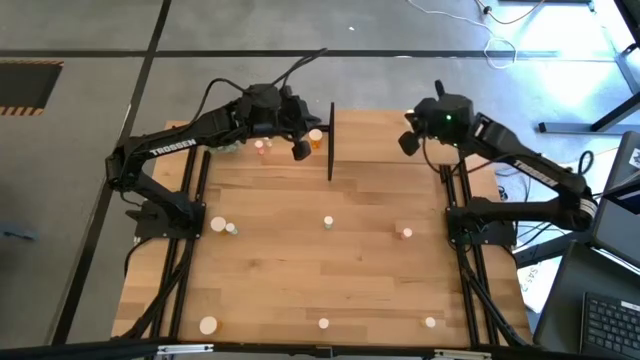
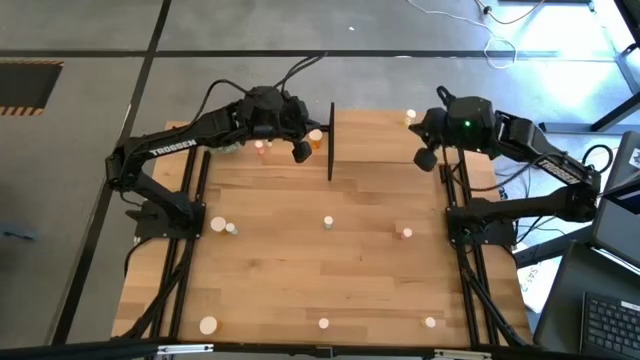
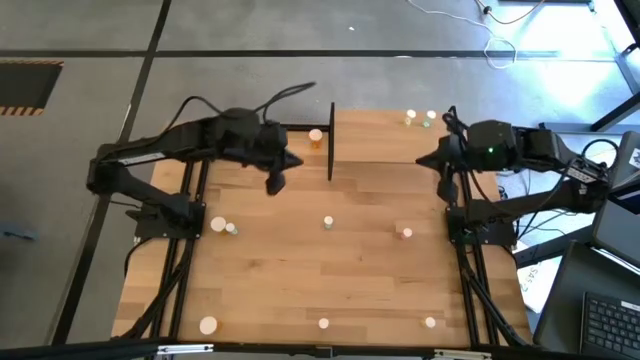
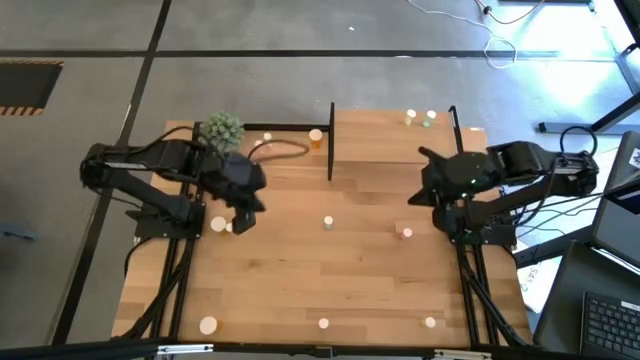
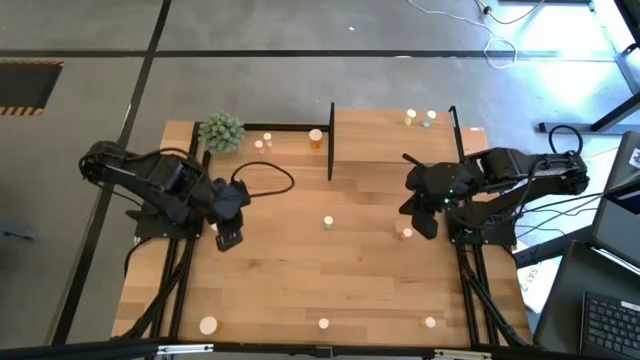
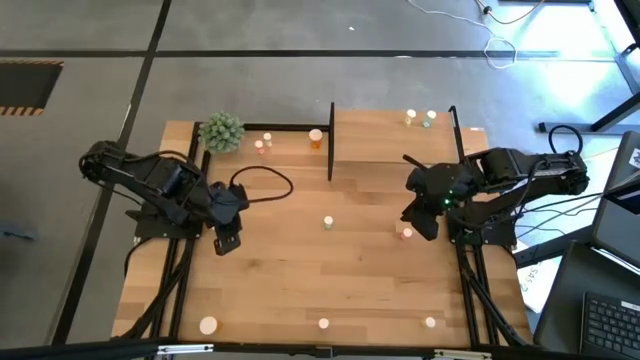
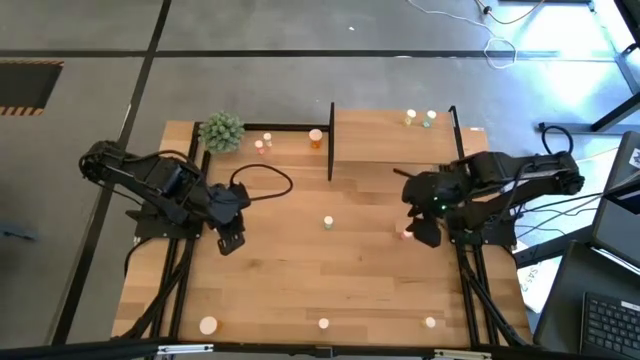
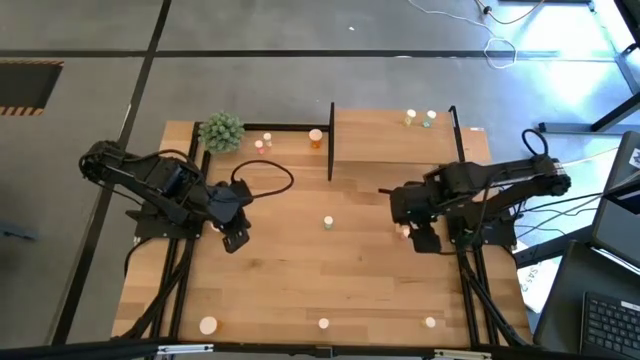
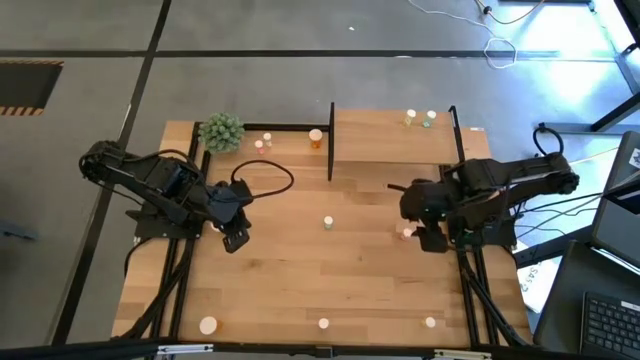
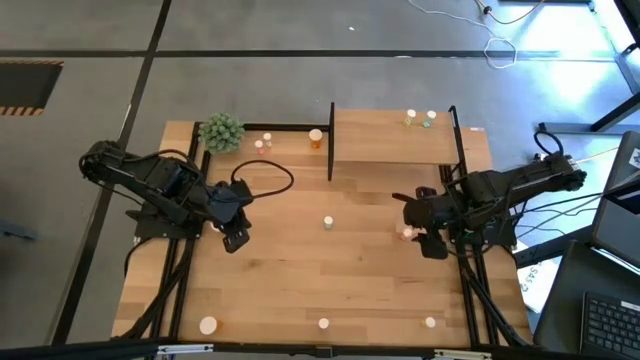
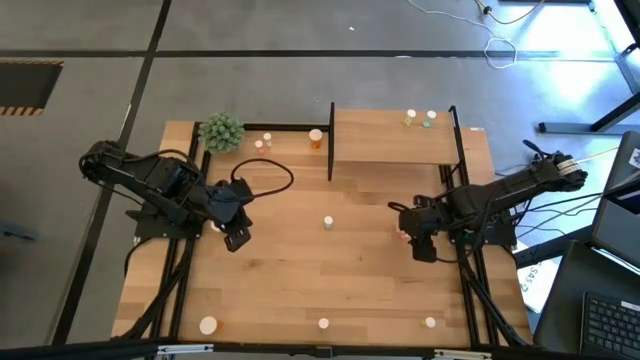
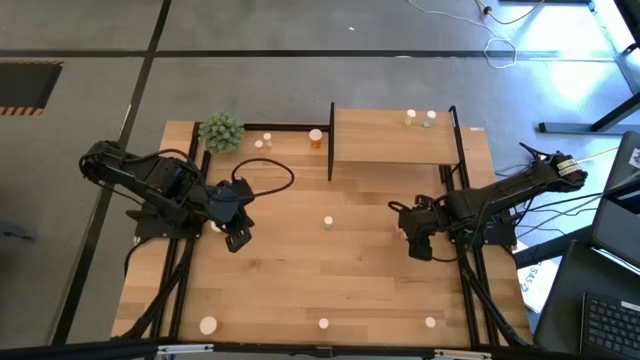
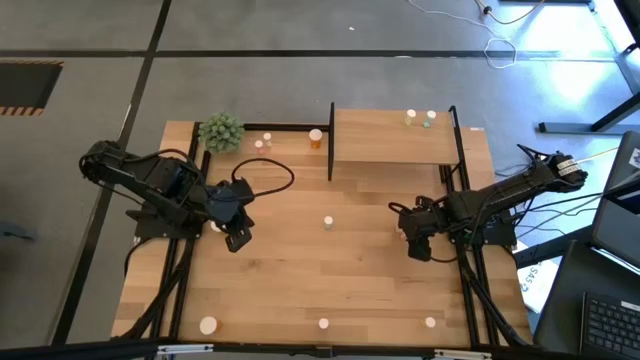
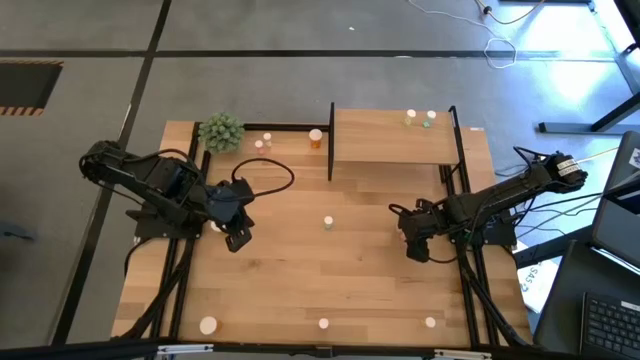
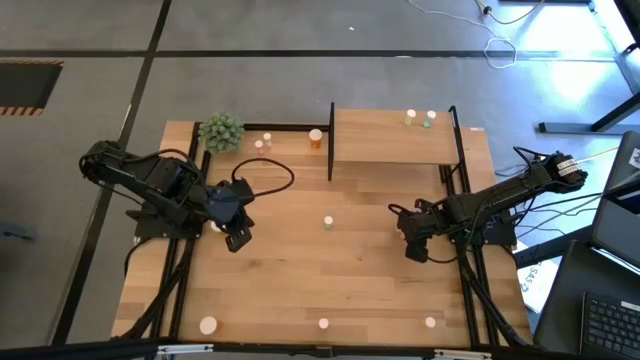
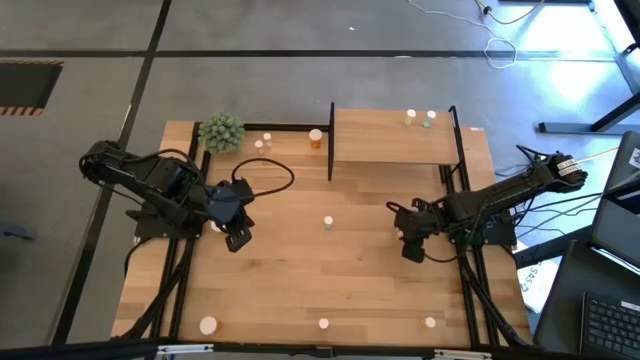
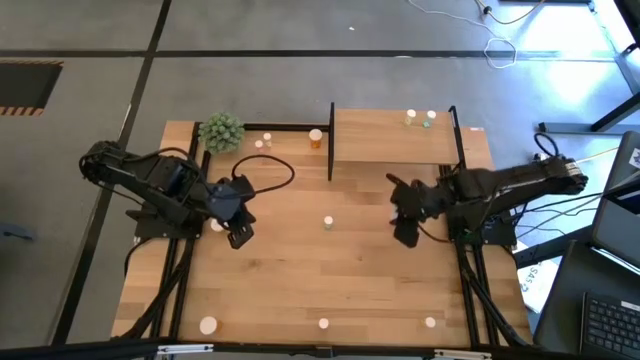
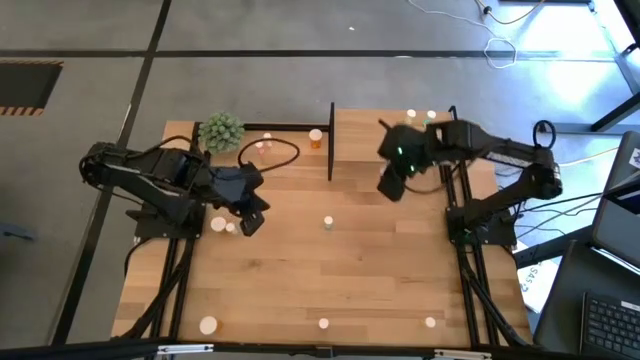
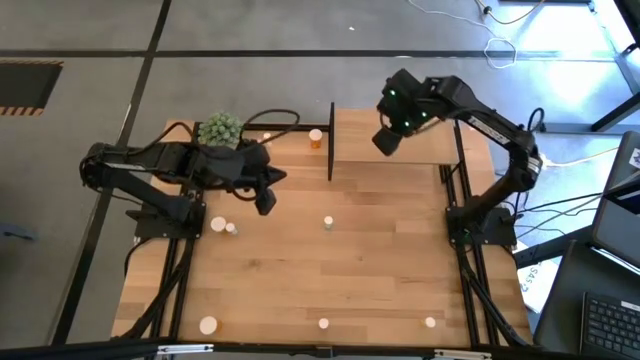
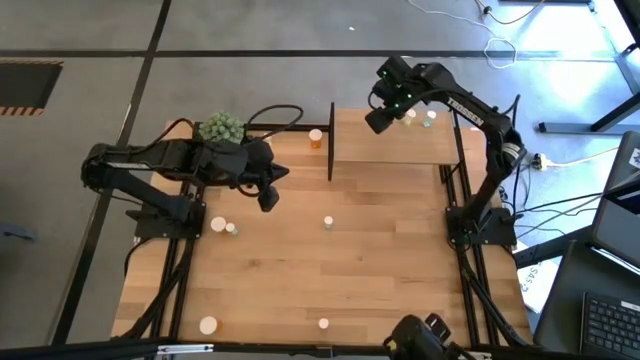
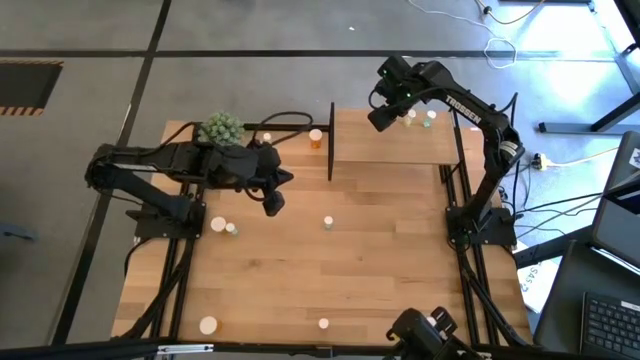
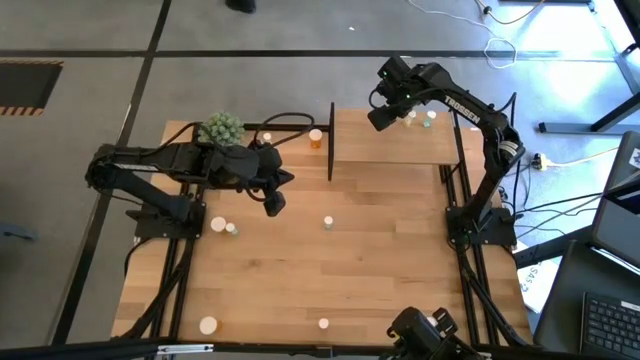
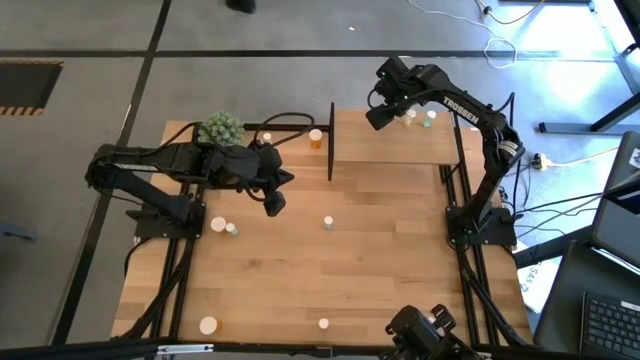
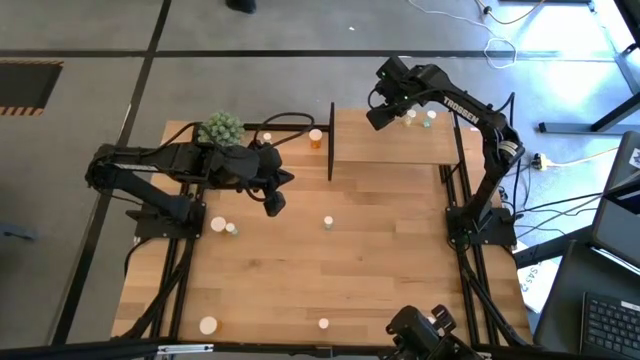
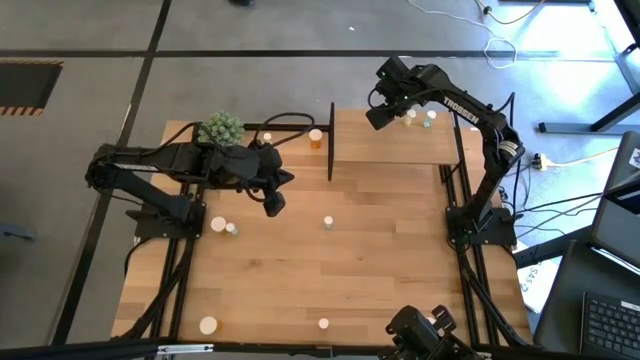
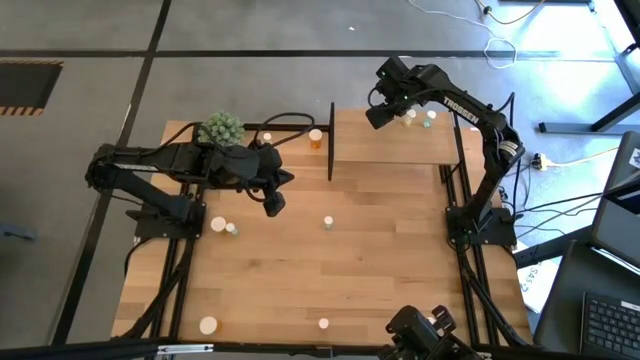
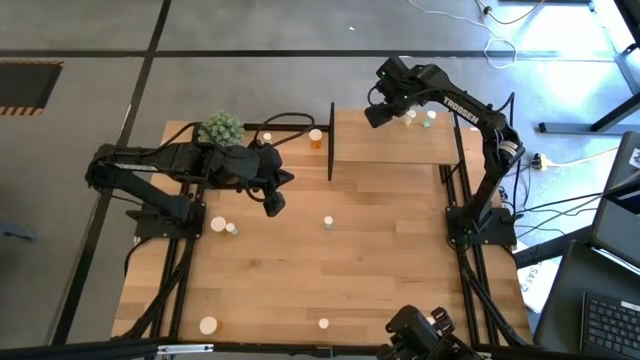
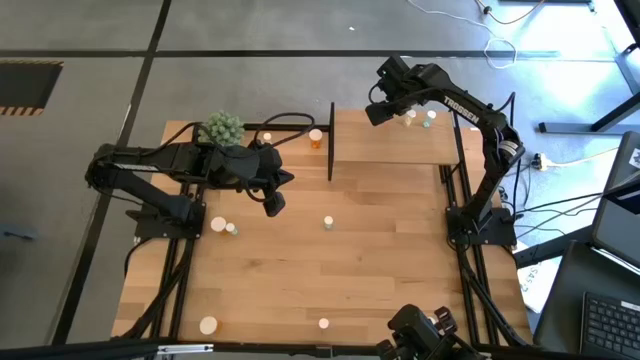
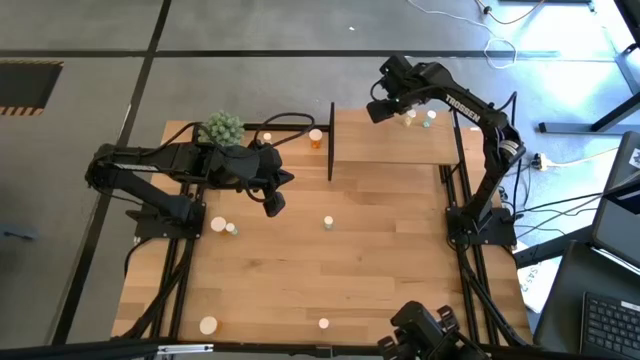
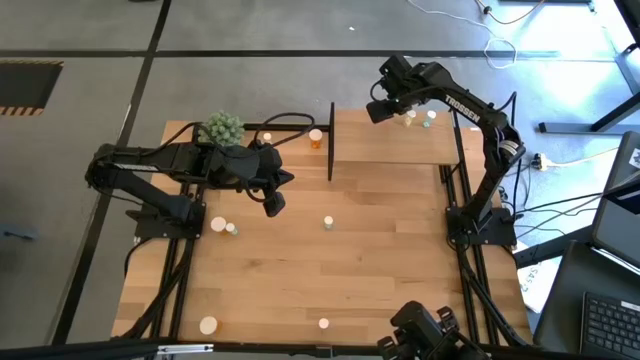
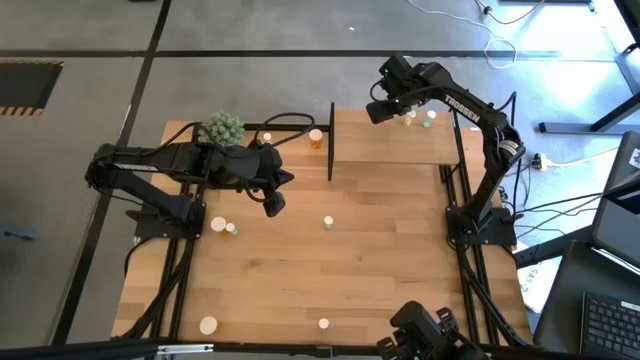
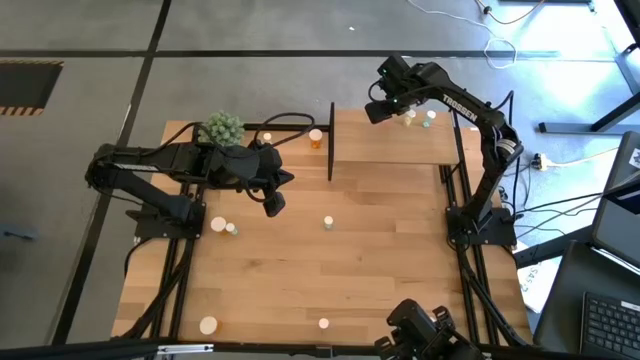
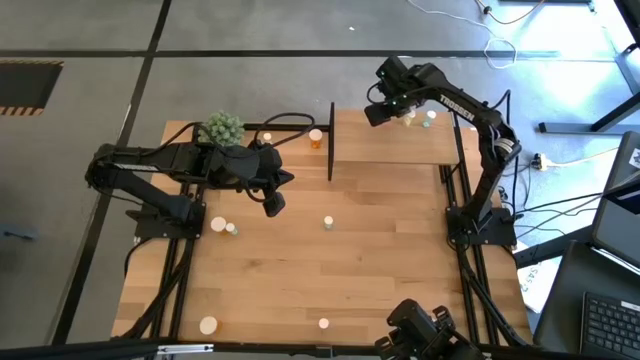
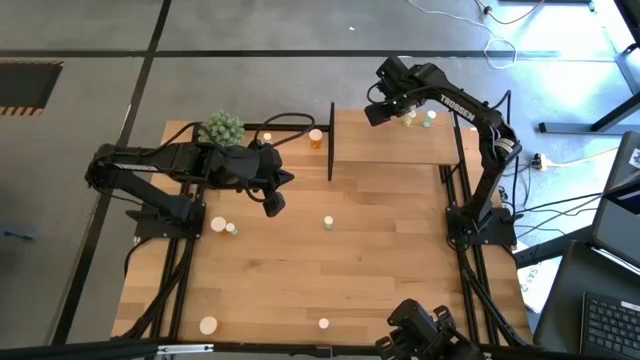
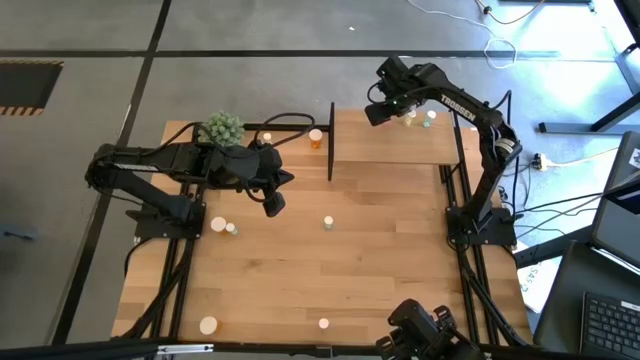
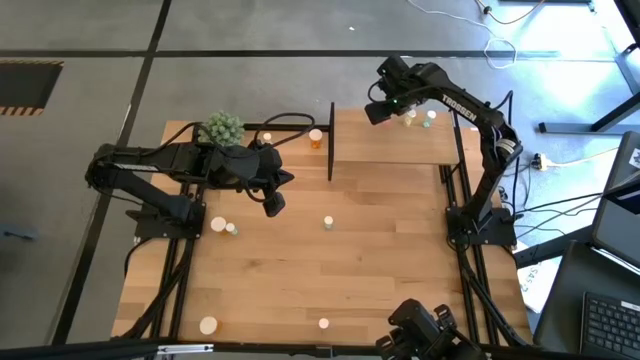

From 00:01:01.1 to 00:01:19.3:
Task: Pick and place medicine bottles onto shelf by color
Put the middle pink pill bottle on the shelf

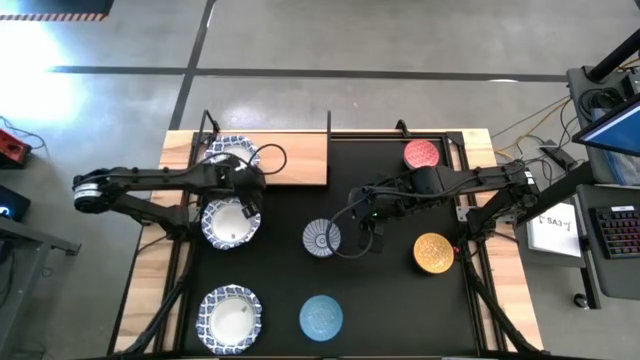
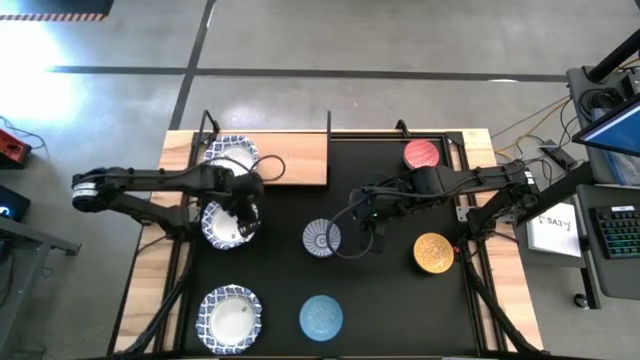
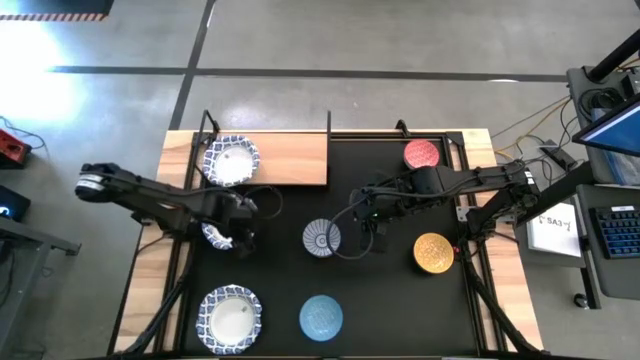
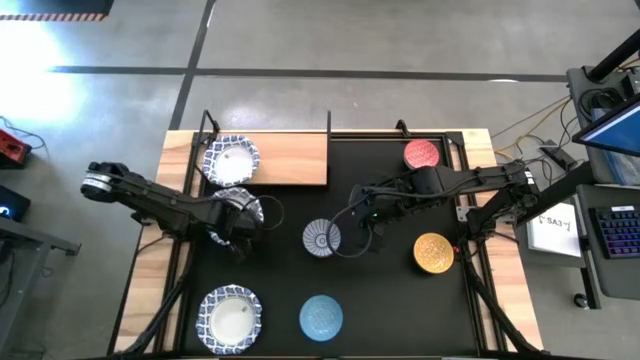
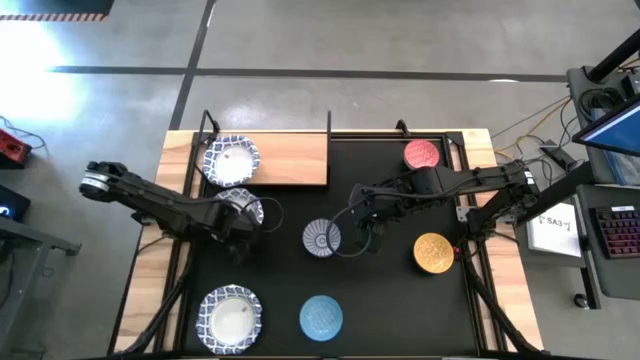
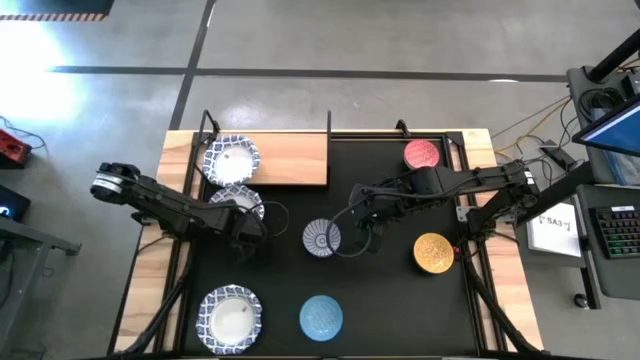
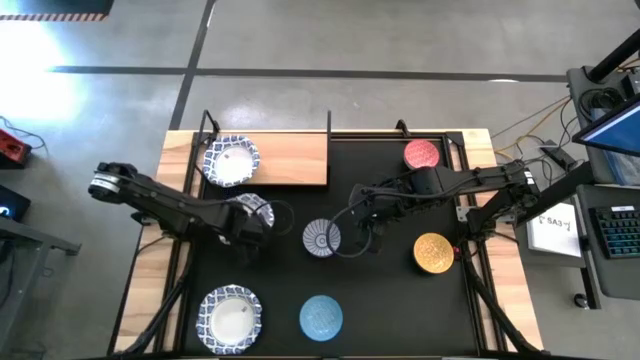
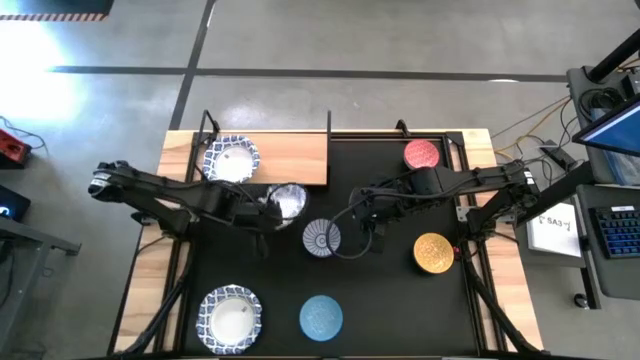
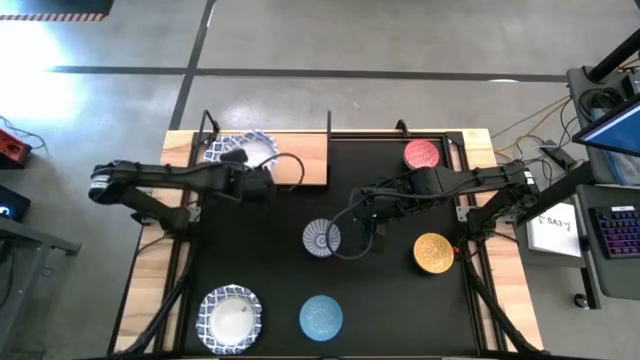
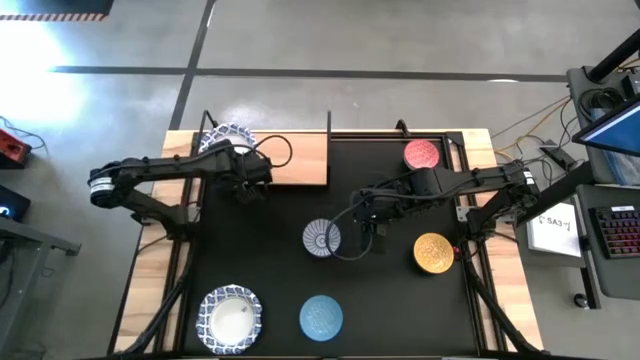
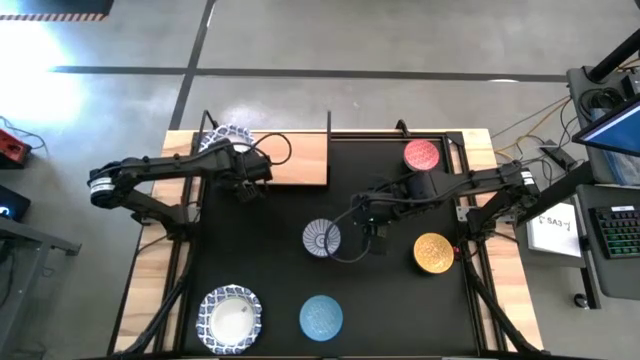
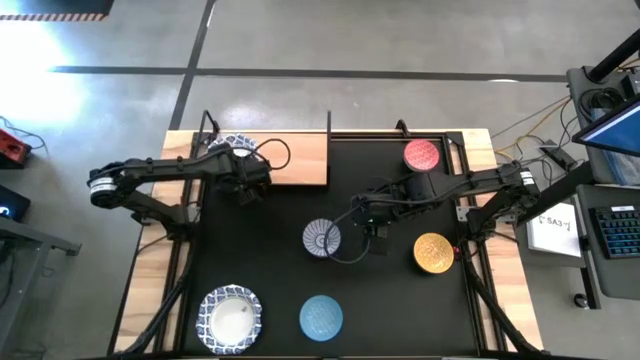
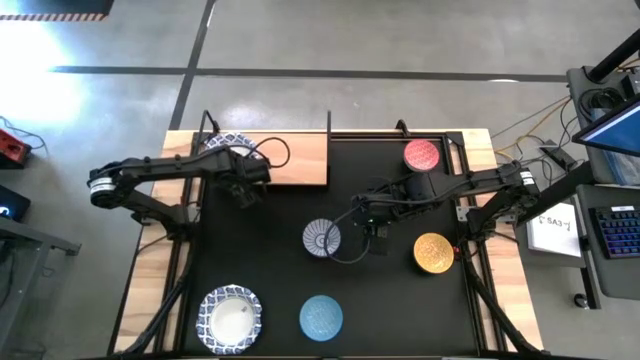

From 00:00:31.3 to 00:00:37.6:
Task: Place and stack bowls onto a shelf
Stack the top white patterned bowl on top of the white patterned bowl on the shelf
